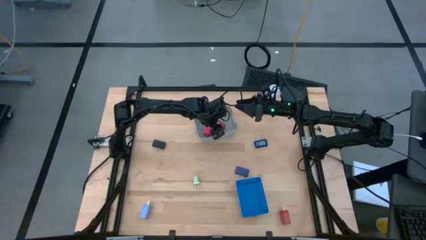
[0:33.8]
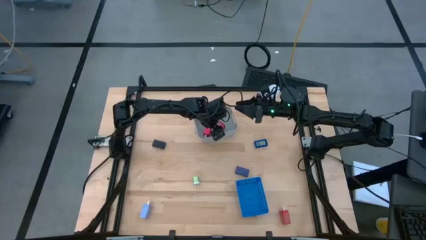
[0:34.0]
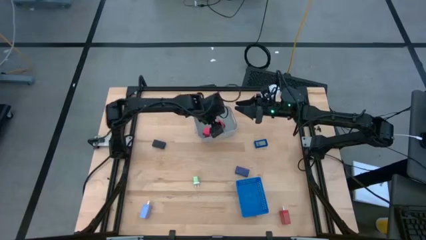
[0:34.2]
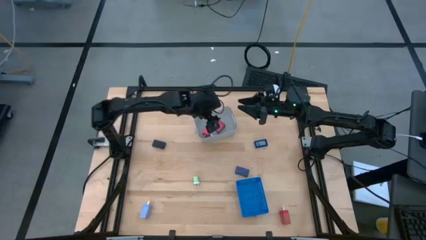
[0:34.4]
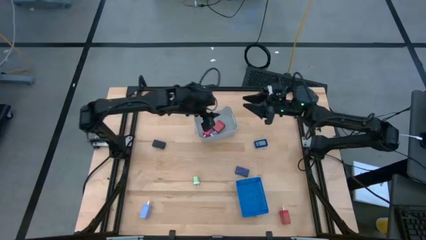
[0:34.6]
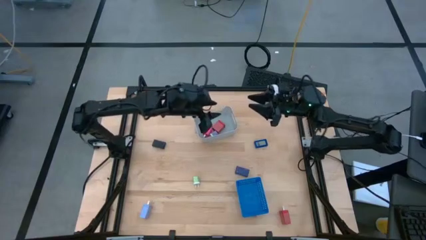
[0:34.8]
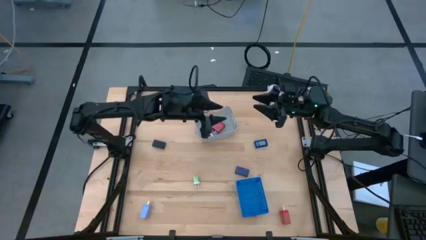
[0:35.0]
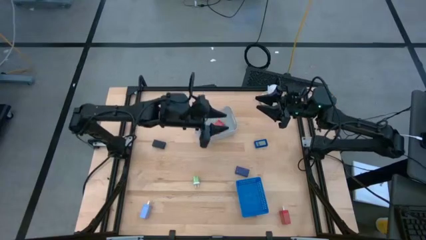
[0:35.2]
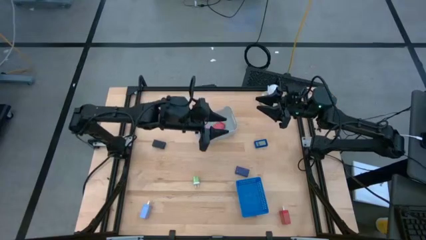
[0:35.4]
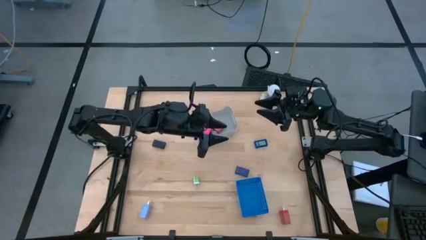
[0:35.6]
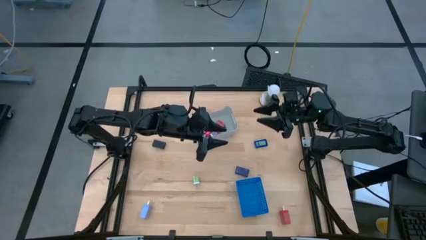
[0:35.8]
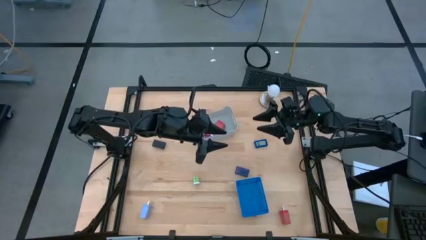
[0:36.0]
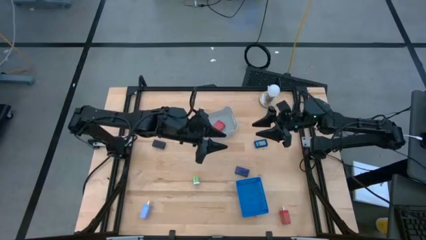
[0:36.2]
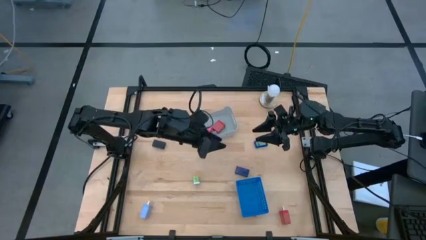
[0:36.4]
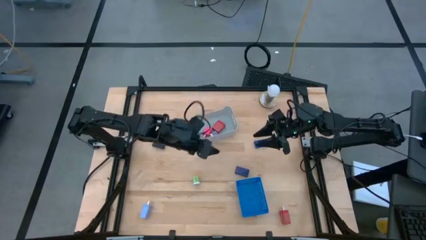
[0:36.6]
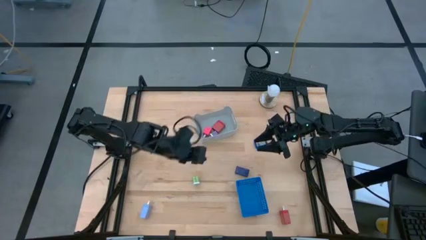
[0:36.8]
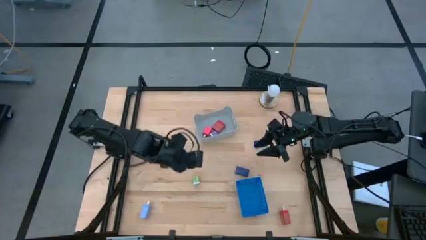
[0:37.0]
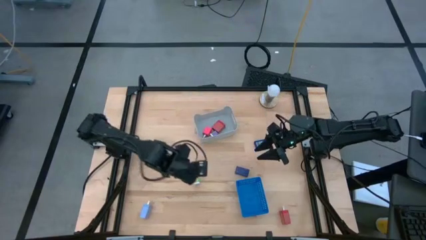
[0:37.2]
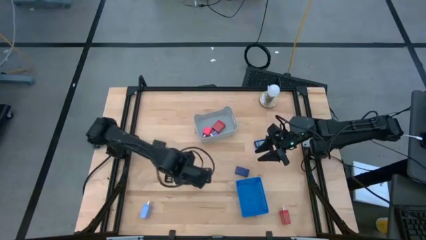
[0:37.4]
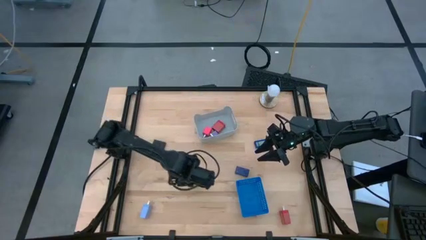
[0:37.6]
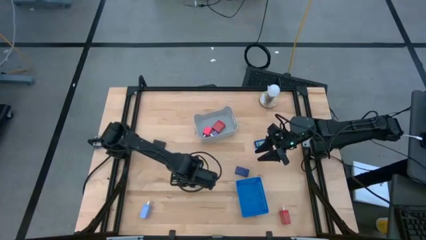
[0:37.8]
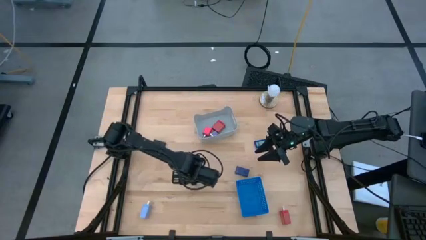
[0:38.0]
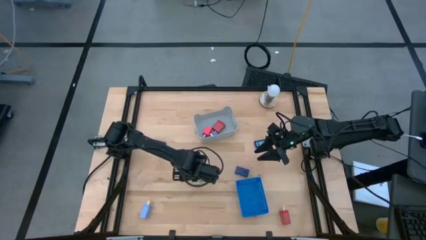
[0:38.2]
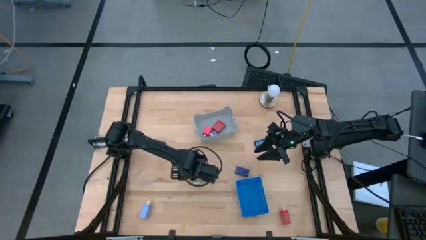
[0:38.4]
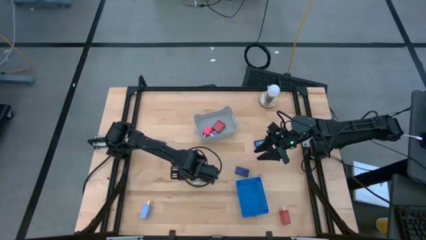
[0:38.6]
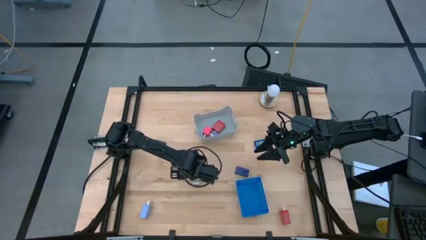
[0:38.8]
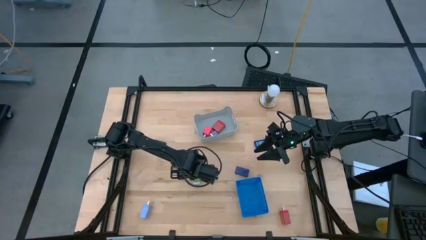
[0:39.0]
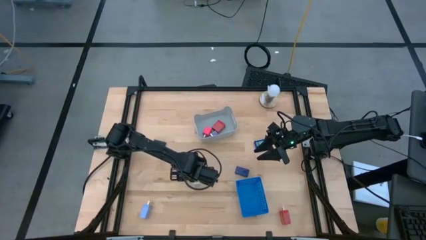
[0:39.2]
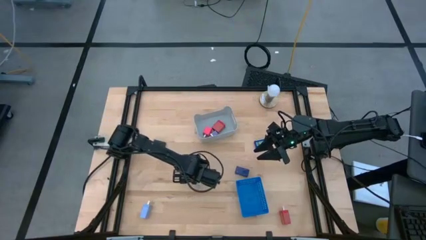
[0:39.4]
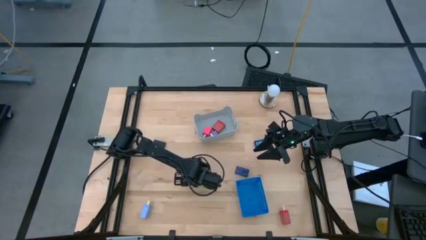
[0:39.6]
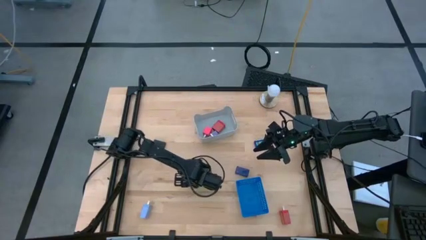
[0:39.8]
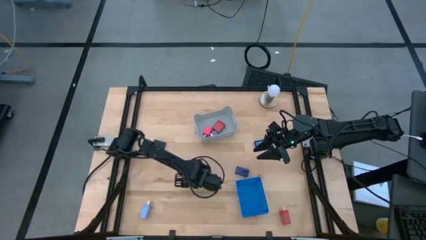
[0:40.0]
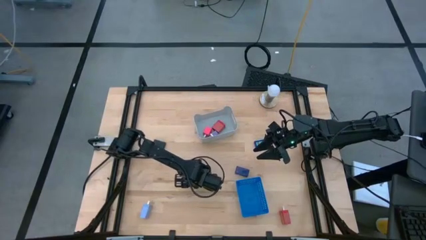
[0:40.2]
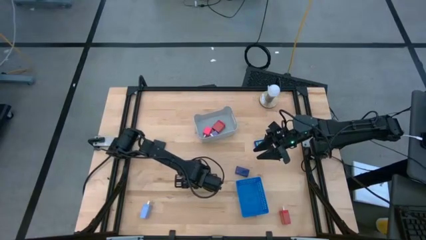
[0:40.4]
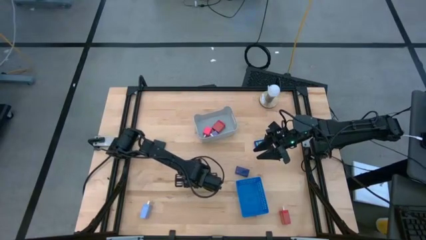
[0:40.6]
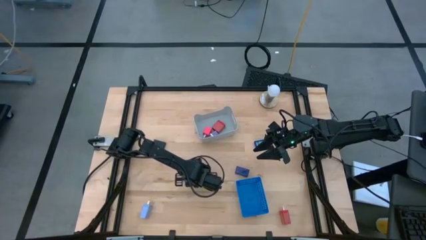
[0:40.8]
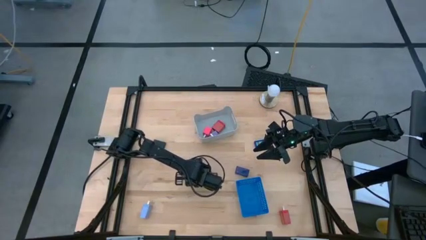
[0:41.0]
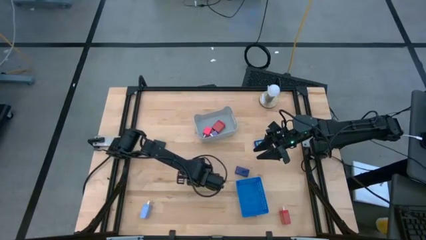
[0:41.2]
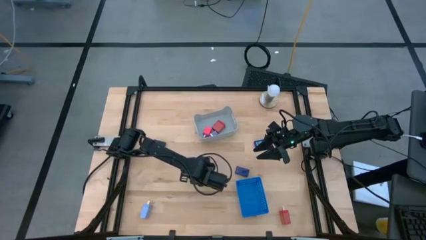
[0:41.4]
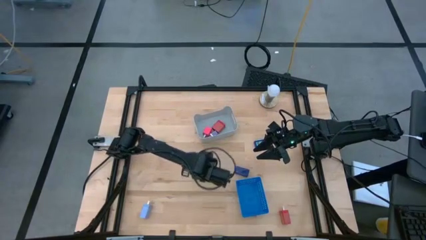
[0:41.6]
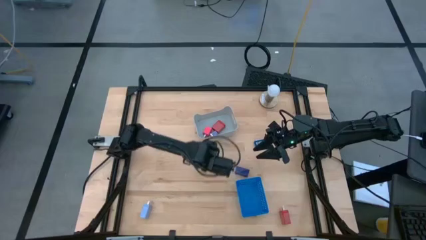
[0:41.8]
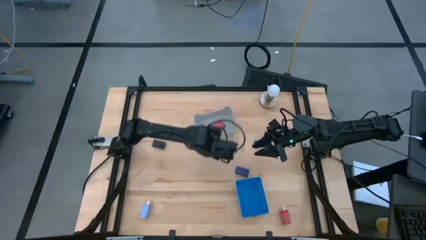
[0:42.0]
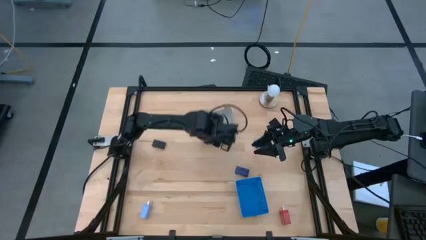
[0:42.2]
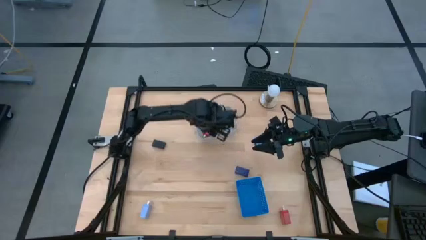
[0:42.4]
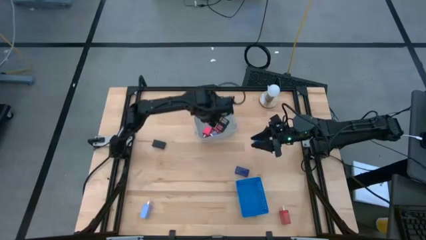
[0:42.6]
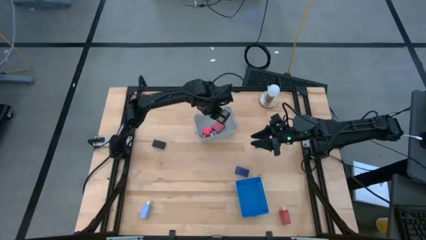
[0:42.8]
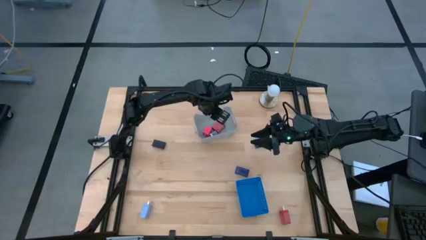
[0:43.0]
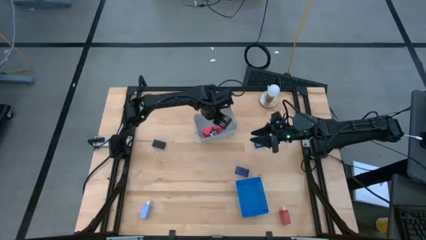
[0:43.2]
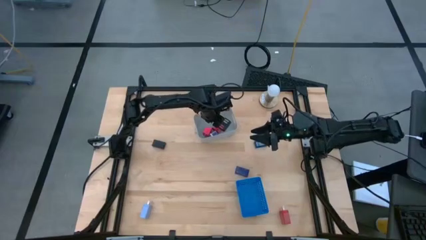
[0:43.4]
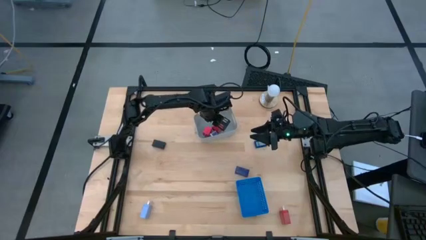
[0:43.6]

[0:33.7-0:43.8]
Task: Pick & Place Office items
Put the green charger adapter into the gray bin
